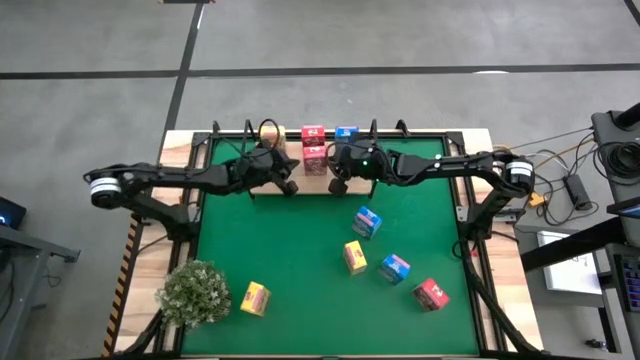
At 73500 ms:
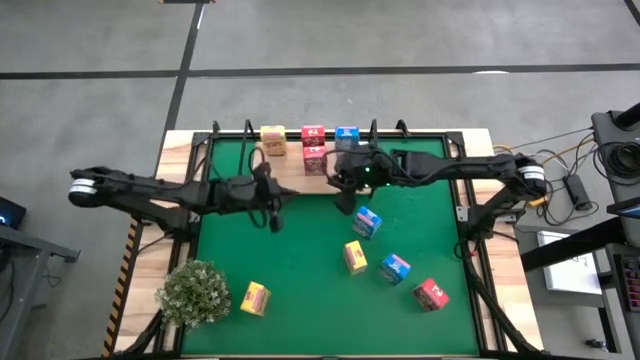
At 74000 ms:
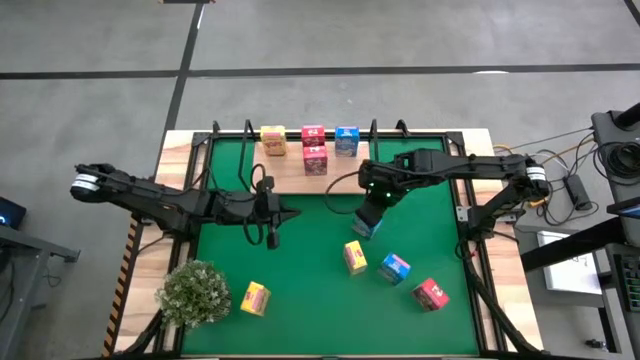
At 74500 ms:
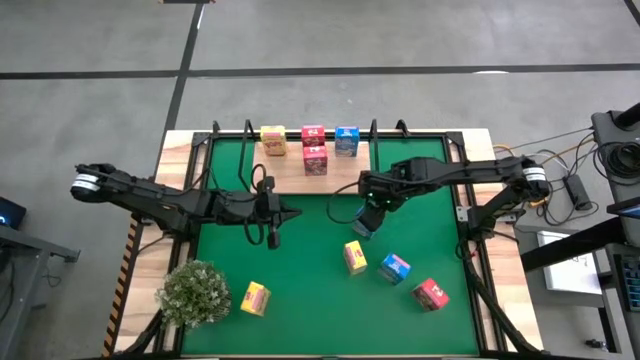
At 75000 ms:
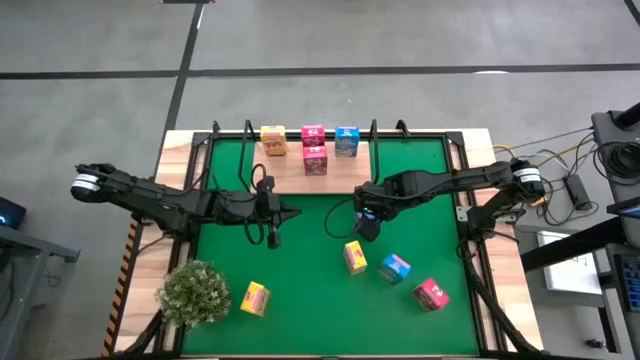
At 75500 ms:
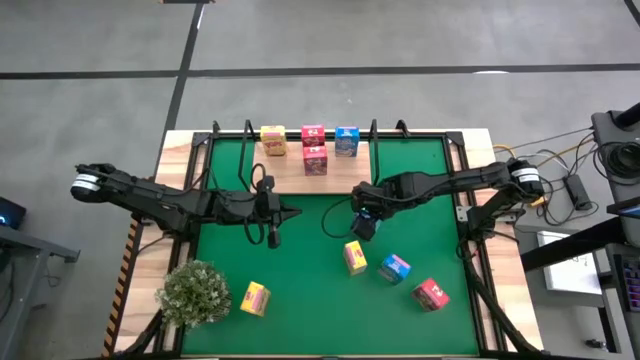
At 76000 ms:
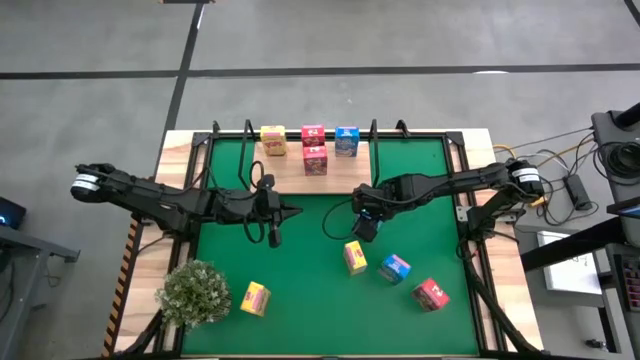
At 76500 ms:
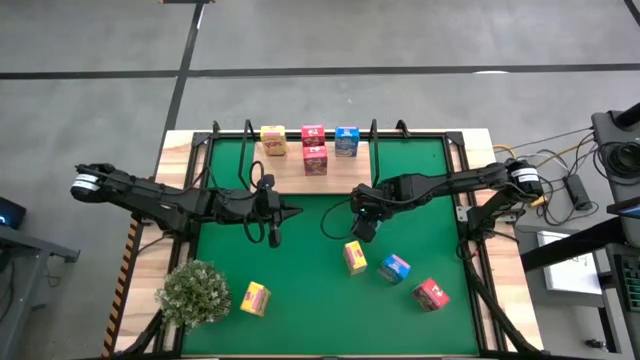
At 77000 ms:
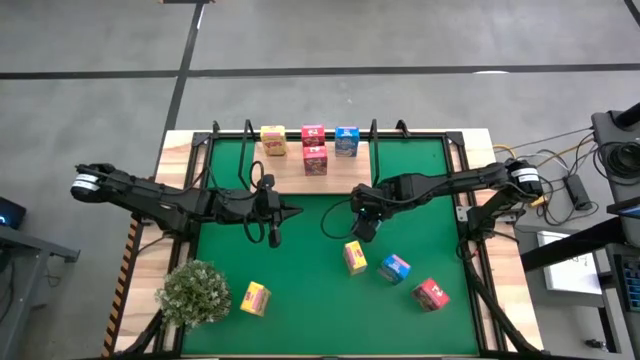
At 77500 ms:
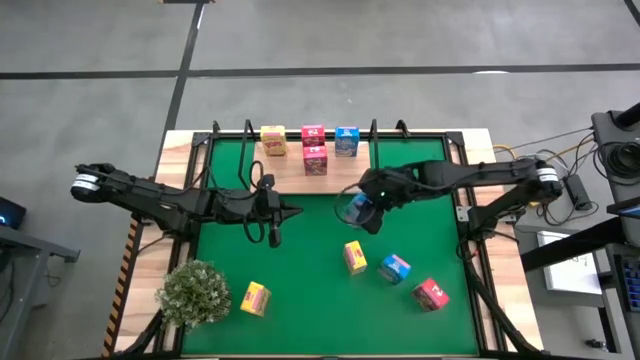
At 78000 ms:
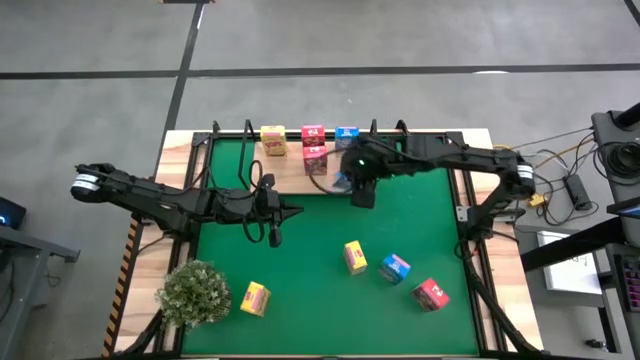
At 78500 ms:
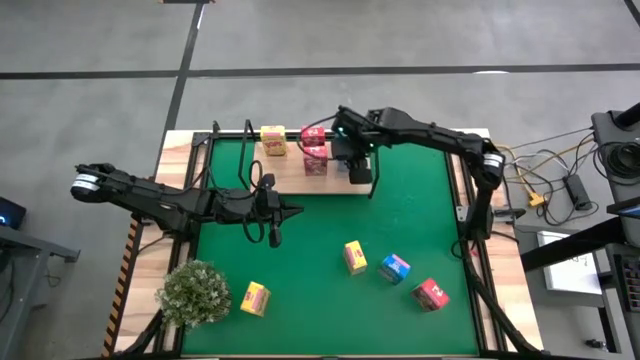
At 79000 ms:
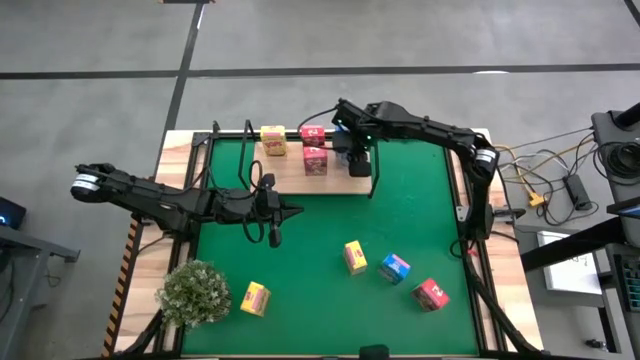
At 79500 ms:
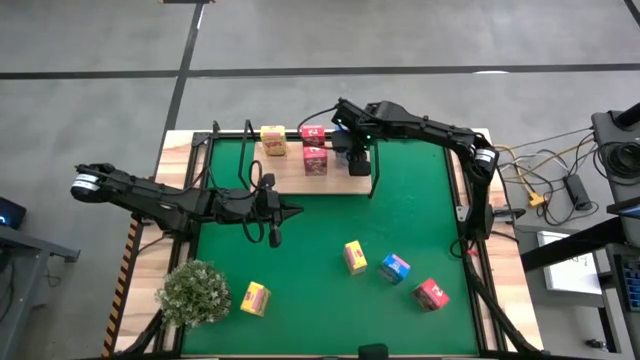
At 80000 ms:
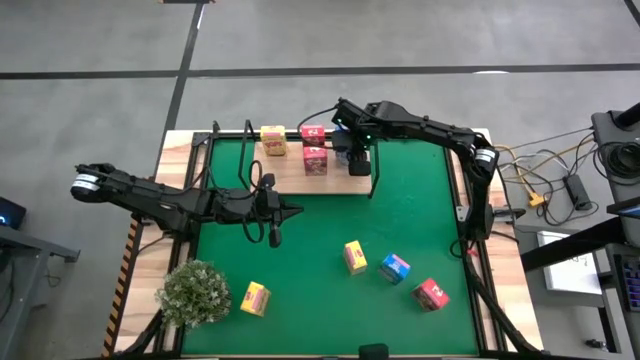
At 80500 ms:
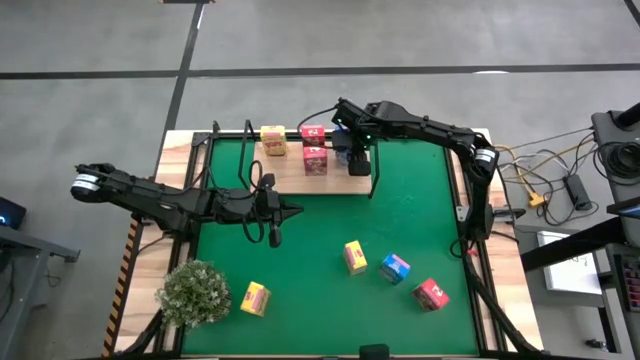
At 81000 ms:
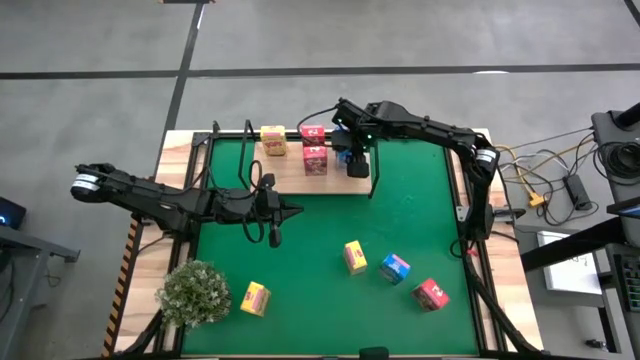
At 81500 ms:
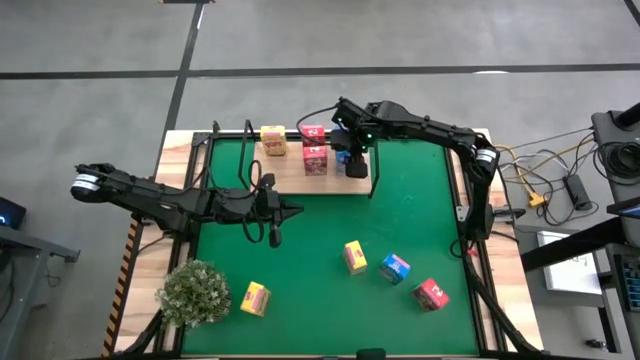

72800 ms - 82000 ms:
Task: Stack cereal on shelf
Put the top blue cereal box on the shelf aligned with the other blue cereal box

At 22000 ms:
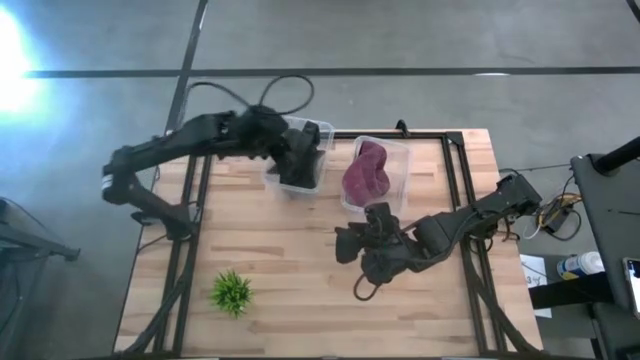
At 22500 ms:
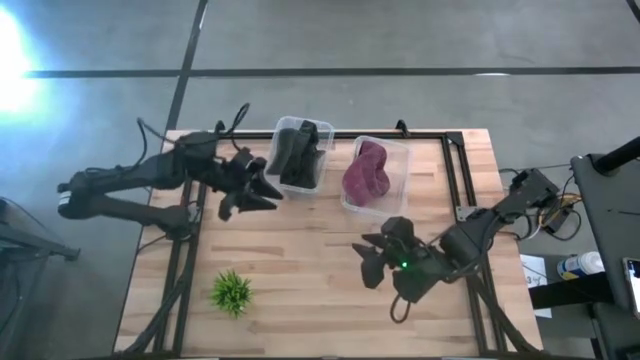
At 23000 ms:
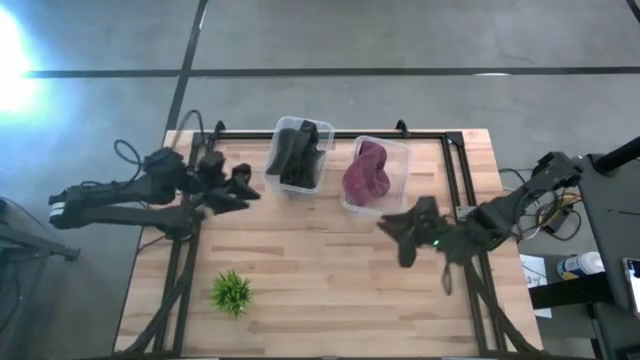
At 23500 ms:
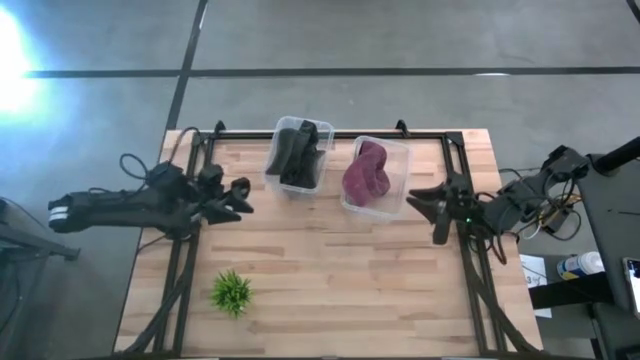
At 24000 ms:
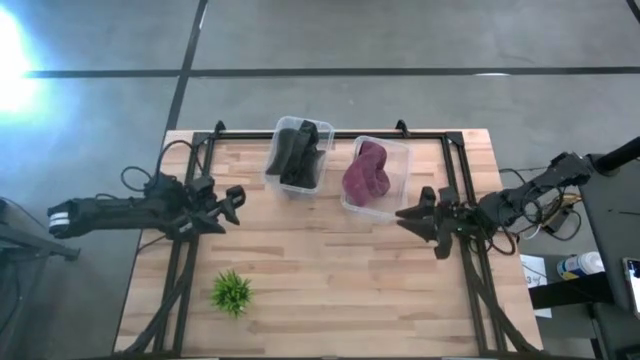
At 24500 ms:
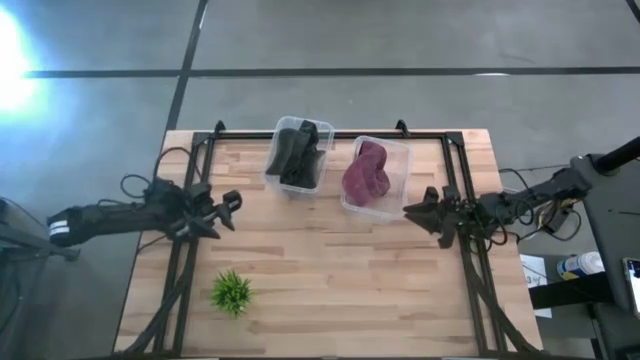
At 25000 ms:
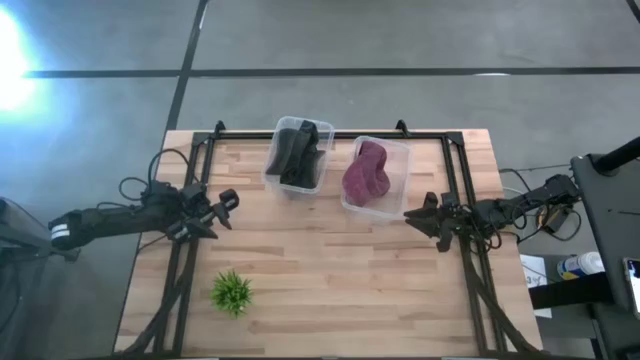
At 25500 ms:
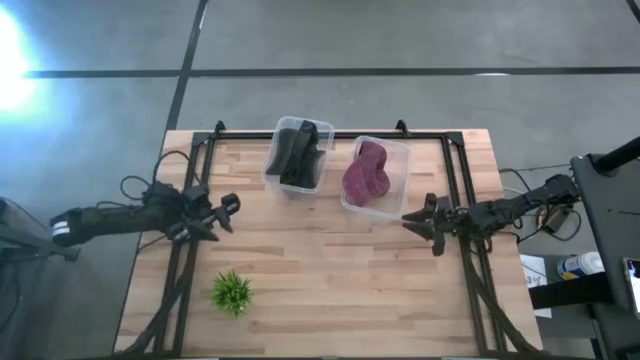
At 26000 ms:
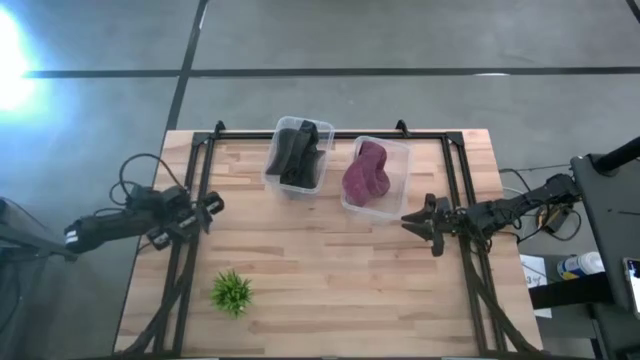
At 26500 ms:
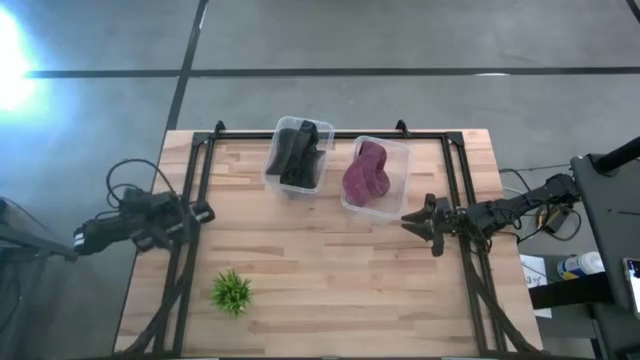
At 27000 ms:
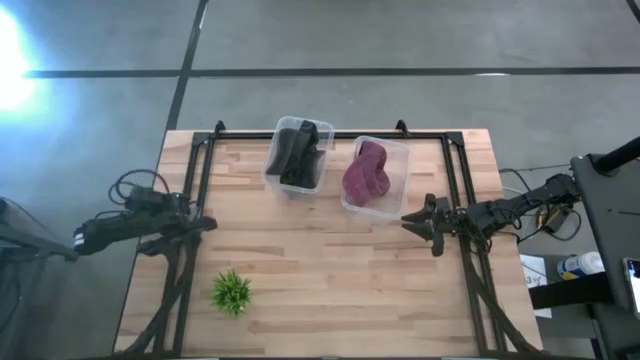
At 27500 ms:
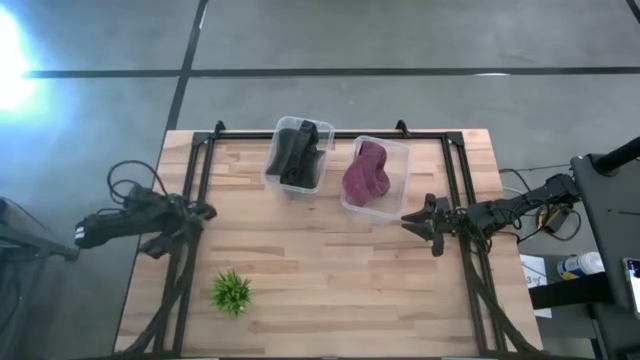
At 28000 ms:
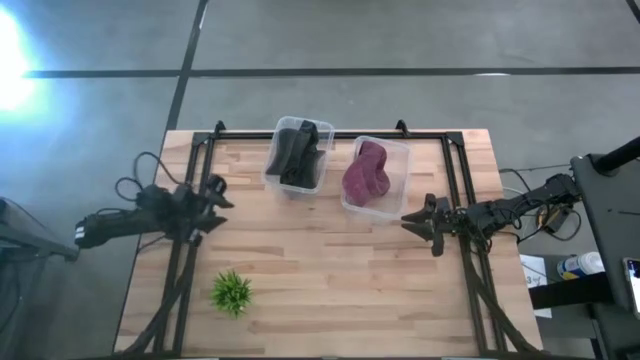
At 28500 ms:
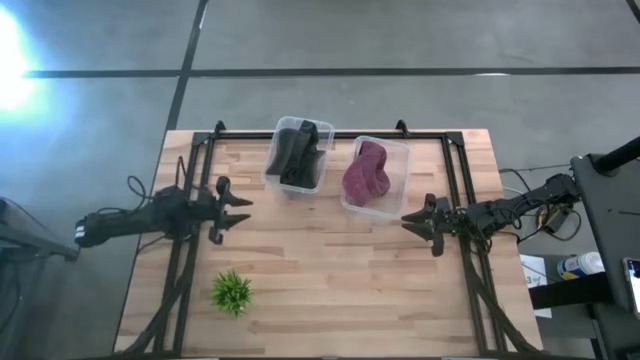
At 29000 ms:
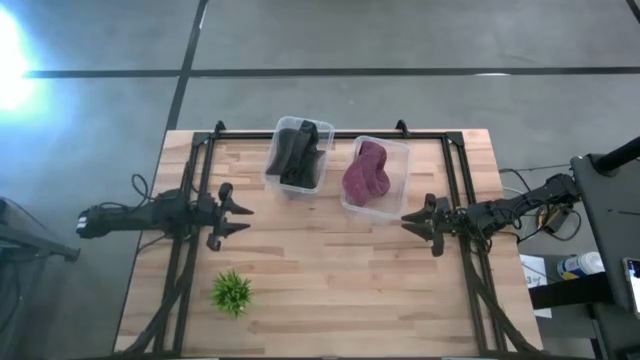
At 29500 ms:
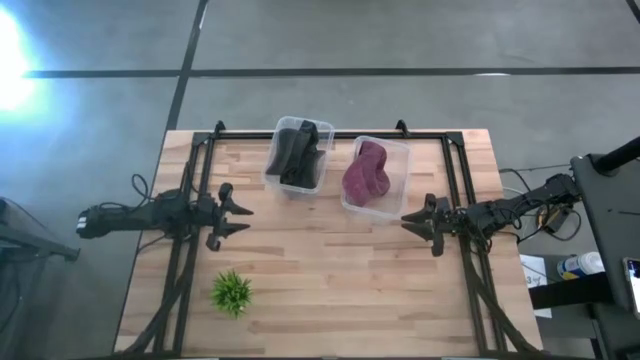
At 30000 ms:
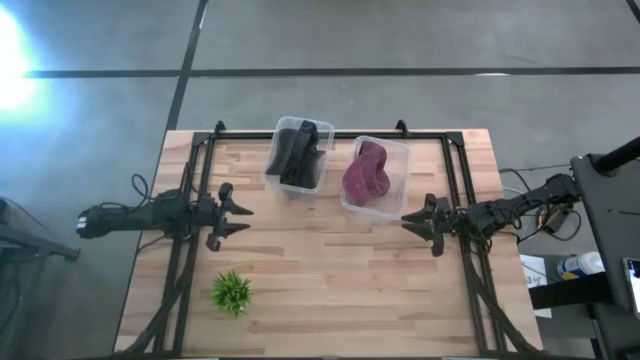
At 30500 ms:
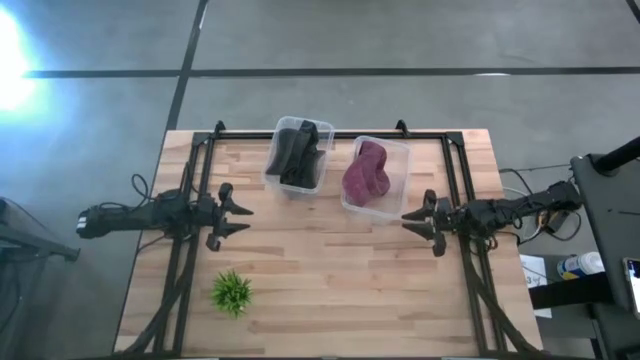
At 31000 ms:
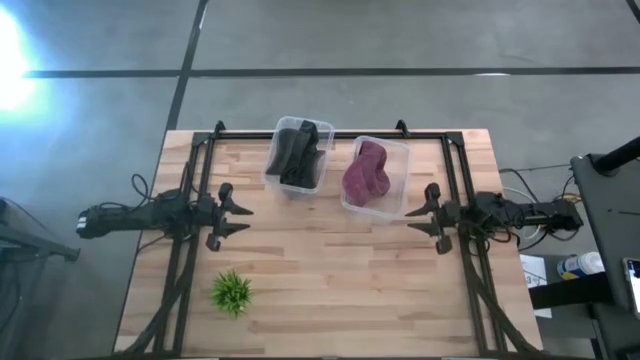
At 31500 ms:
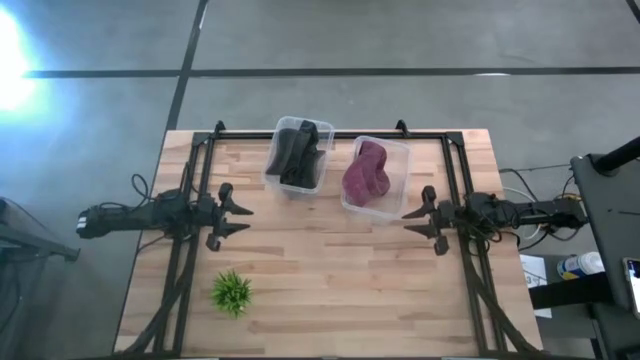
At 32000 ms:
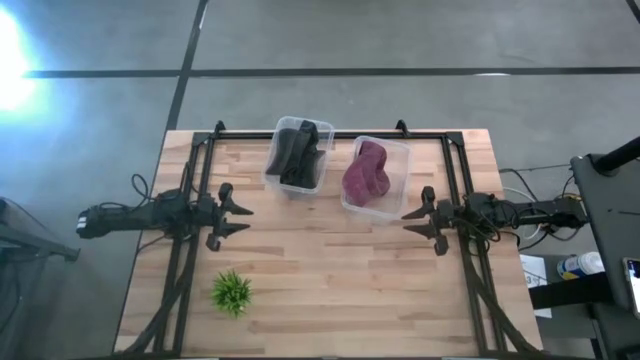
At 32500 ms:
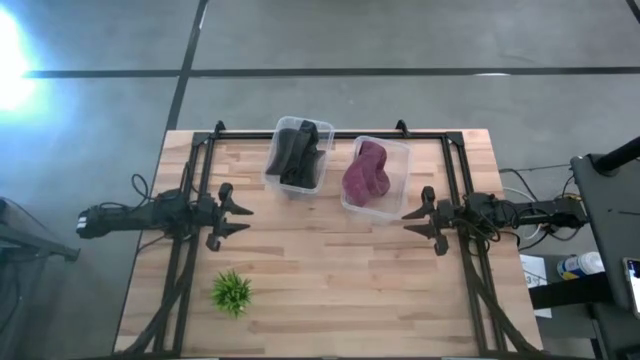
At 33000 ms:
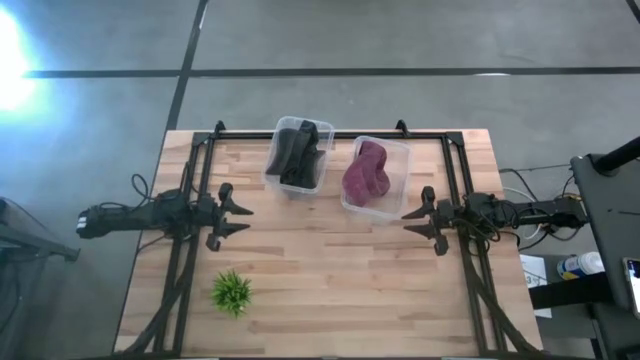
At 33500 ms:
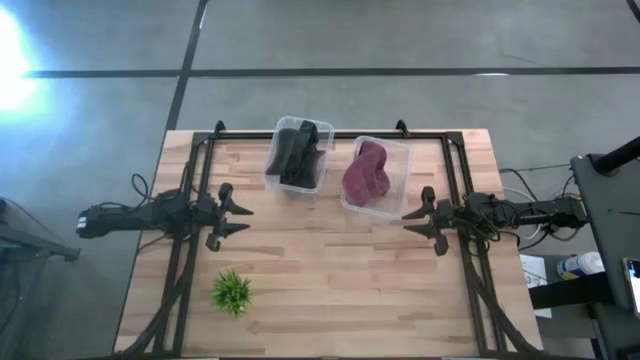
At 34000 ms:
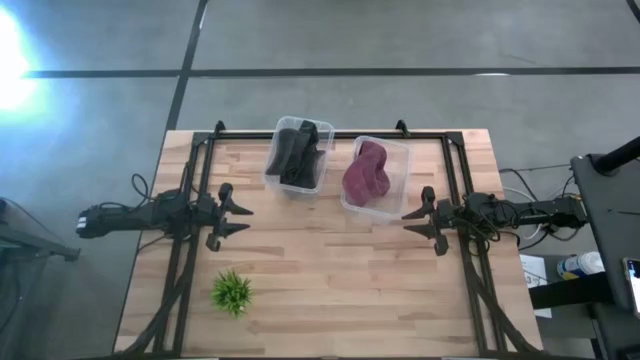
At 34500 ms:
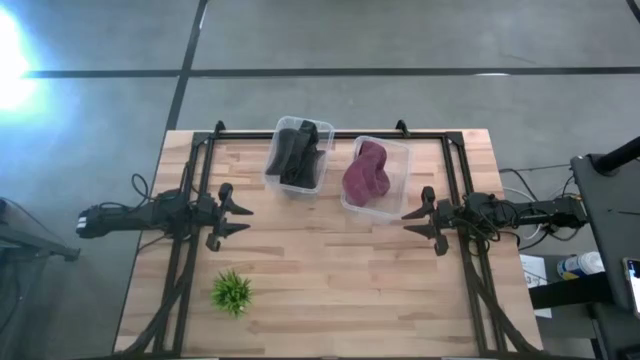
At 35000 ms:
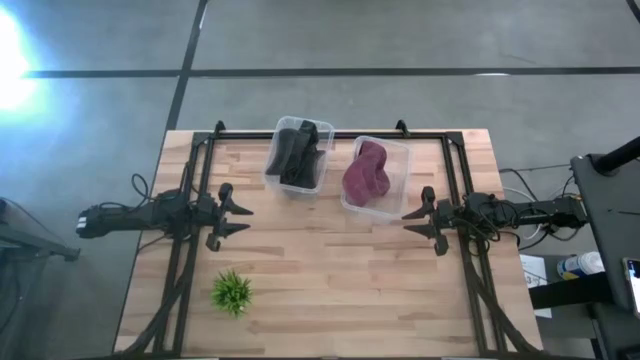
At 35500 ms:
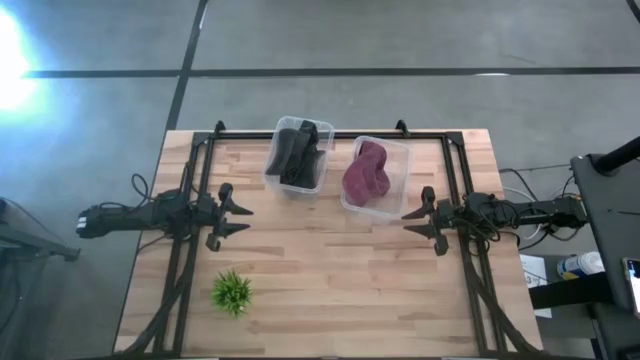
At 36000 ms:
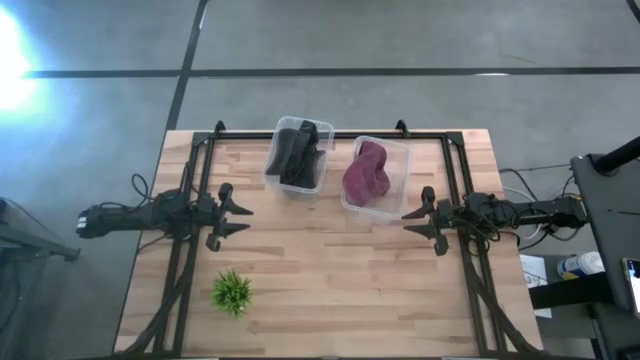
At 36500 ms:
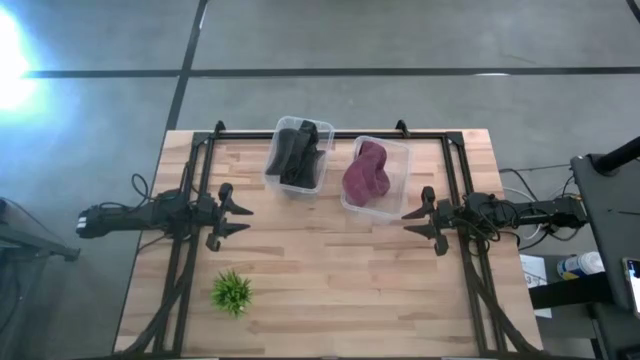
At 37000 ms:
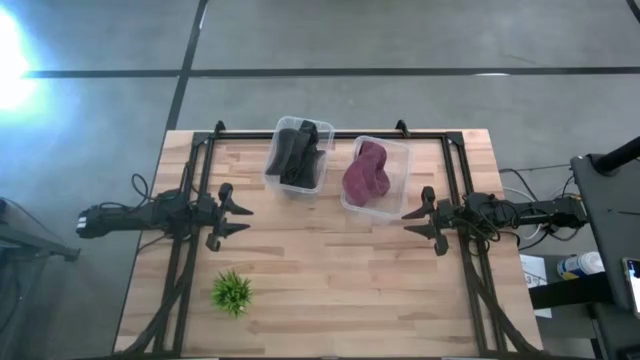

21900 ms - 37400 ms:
Task: Pick & Place hat
Return to Home Position
